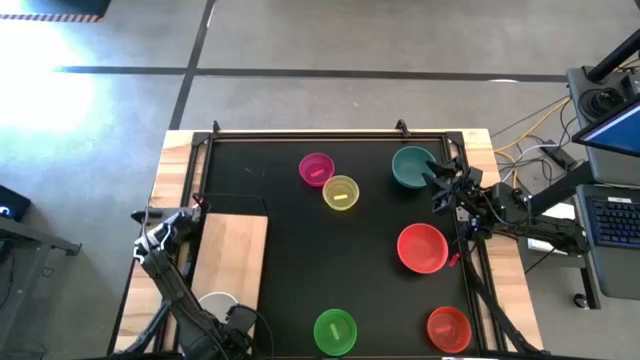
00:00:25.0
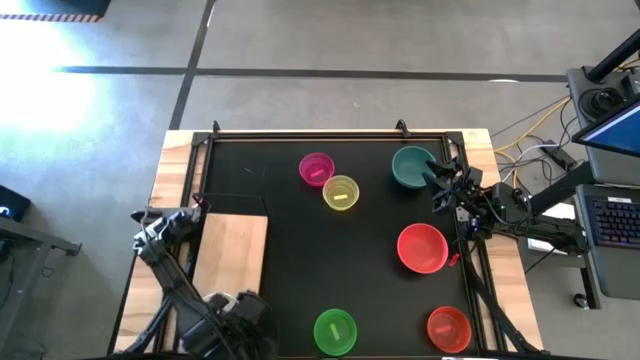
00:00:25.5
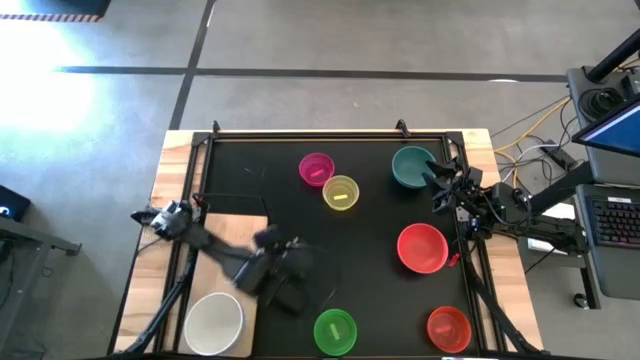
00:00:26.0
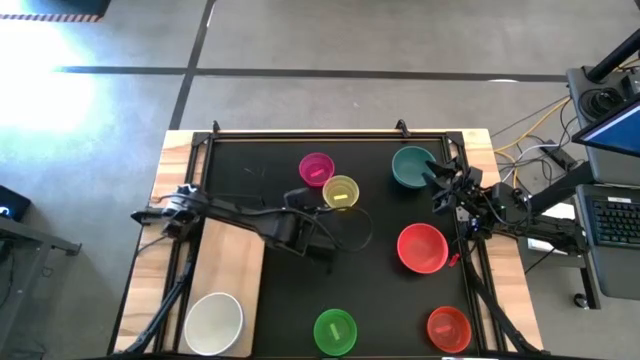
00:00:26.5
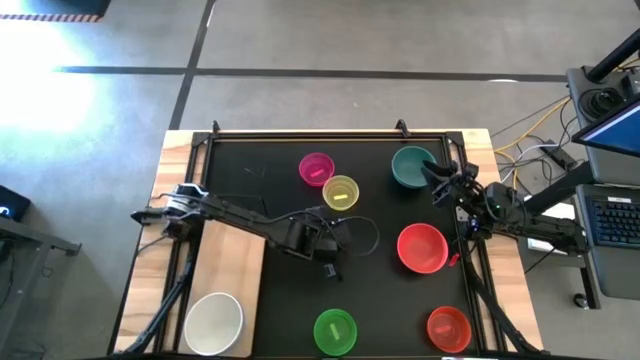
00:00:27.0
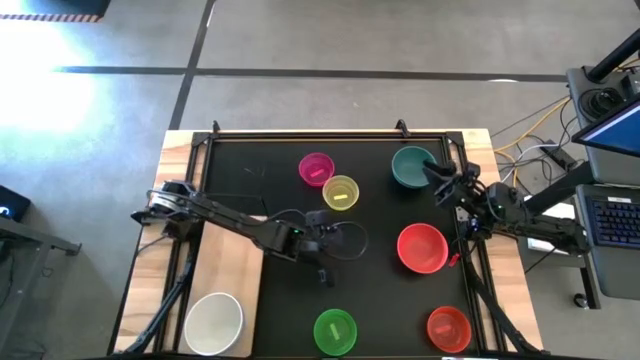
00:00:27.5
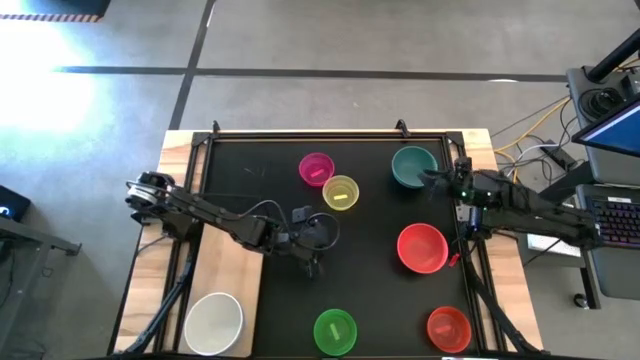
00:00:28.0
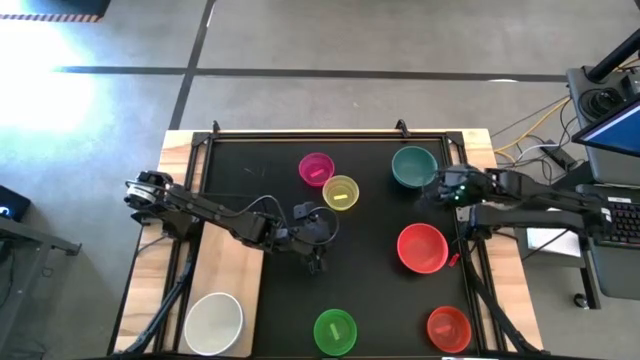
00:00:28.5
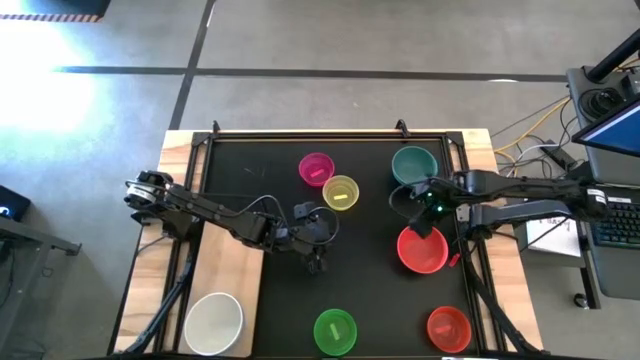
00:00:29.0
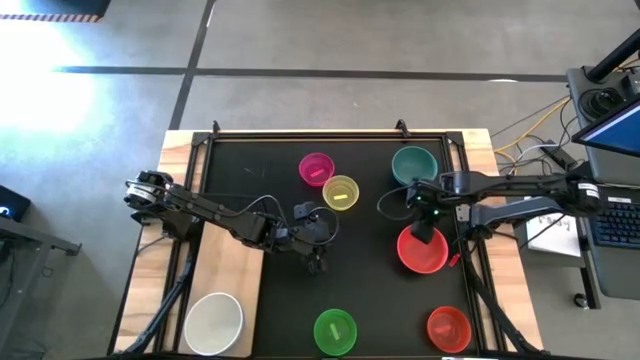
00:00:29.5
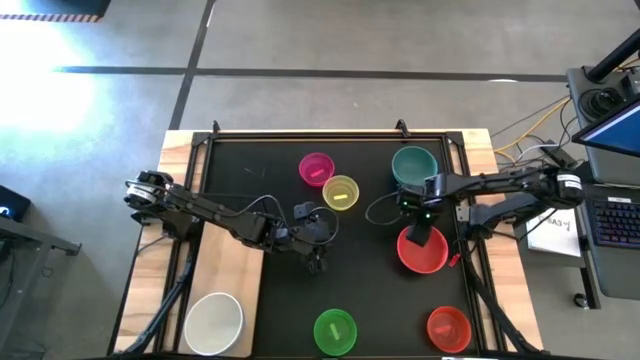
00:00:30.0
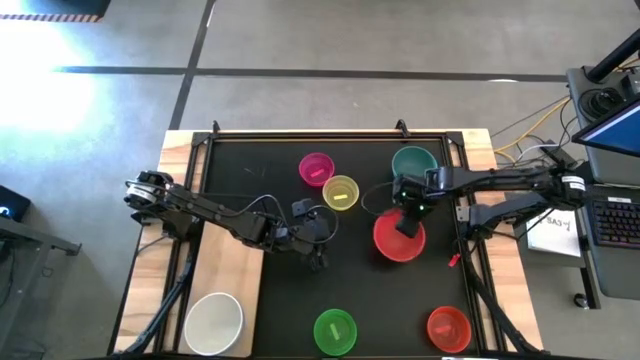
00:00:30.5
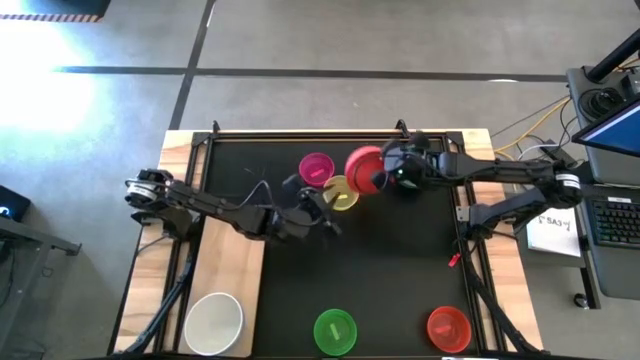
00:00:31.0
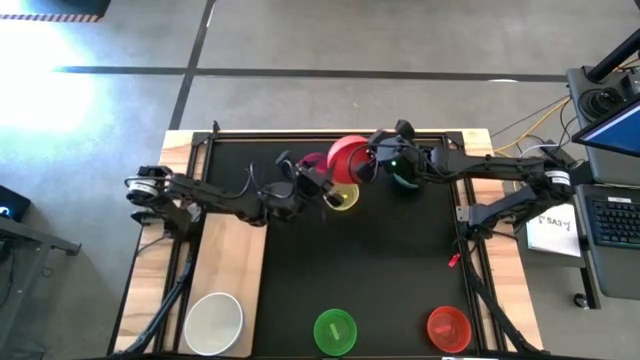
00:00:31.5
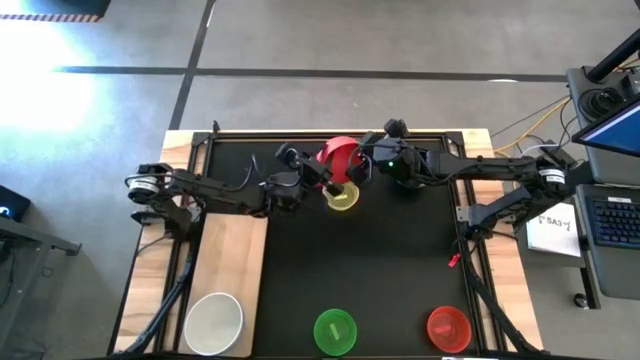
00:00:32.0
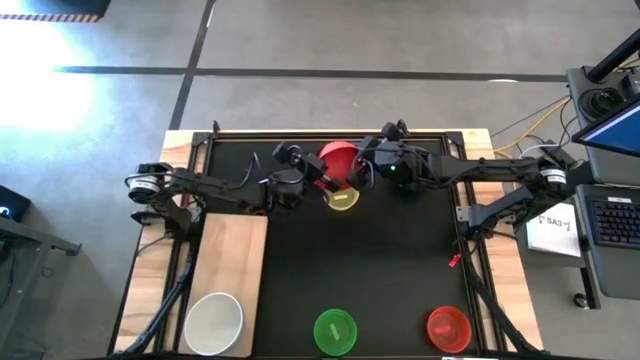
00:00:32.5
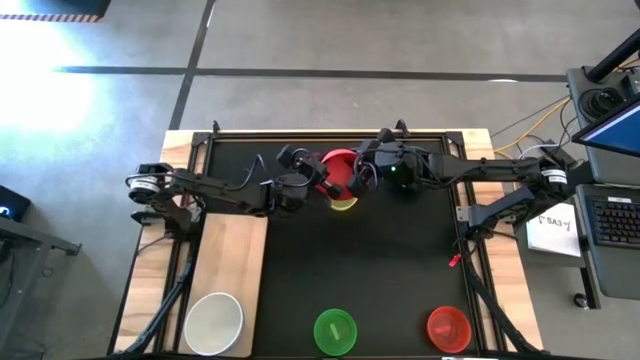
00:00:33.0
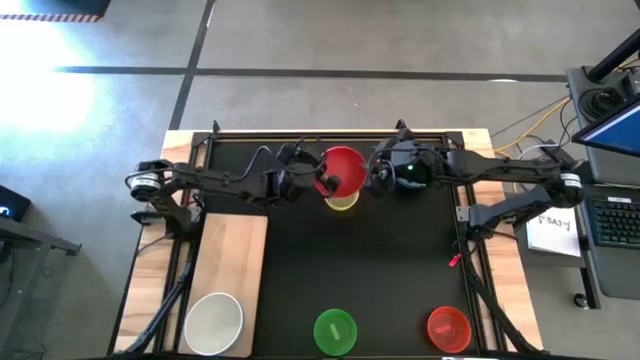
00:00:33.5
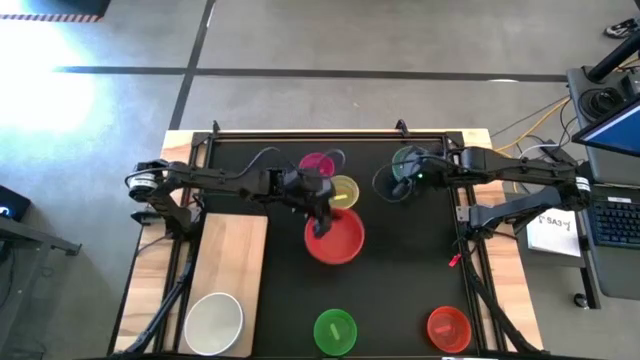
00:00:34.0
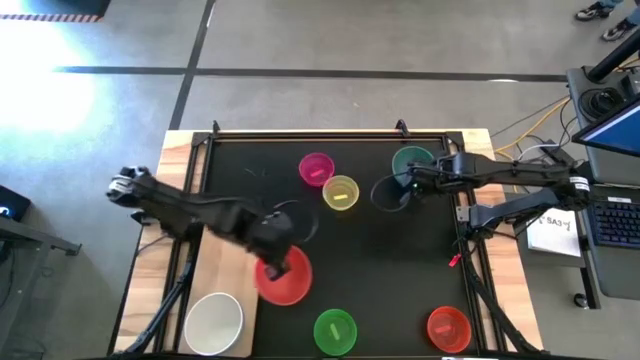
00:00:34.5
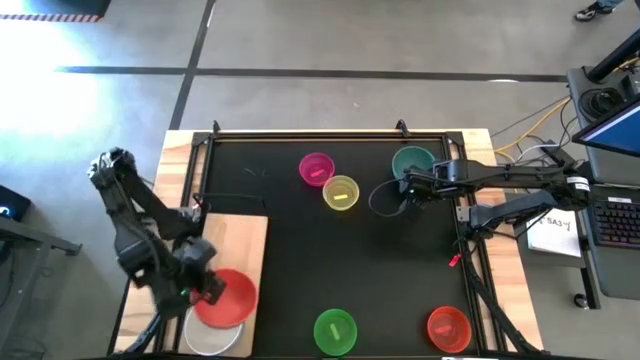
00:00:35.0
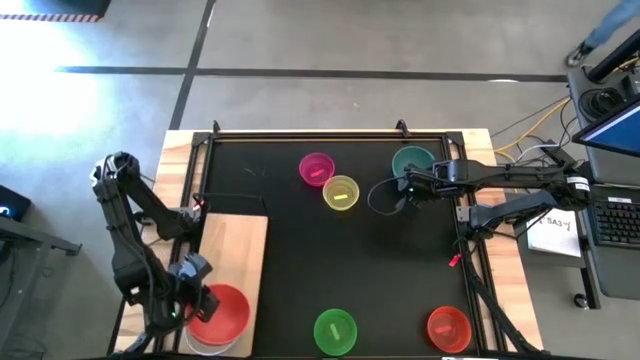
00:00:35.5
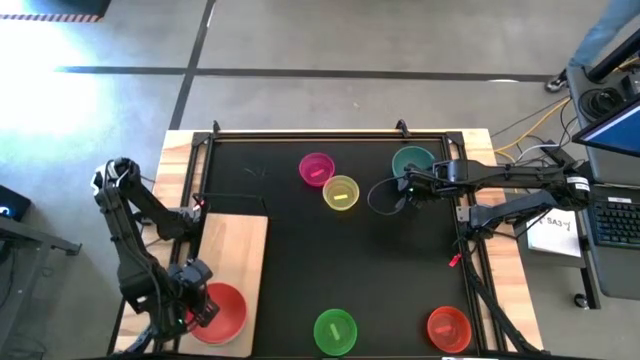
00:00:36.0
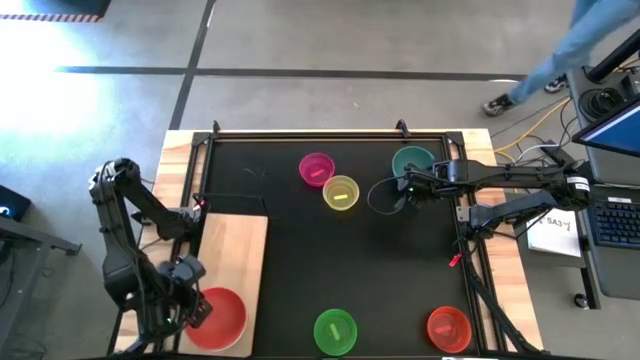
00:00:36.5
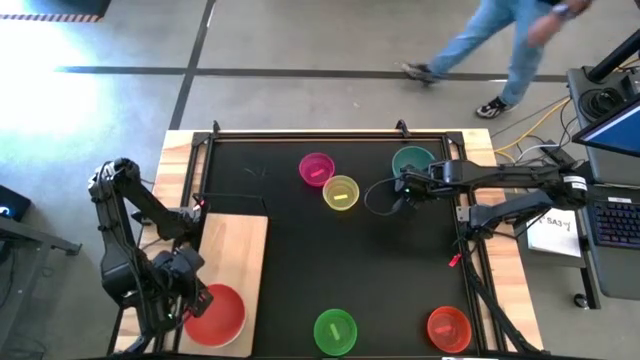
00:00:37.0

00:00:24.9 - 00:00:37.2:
Task: Place and stack bowls onto a shelf
Stack the orange bowl on top of the white bowl on the shelf

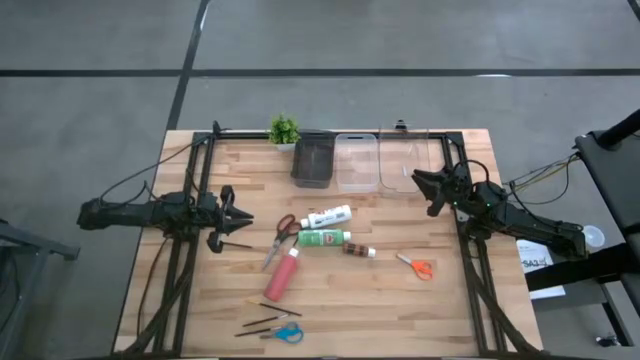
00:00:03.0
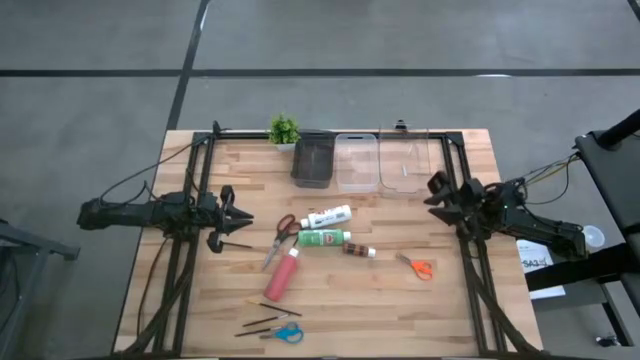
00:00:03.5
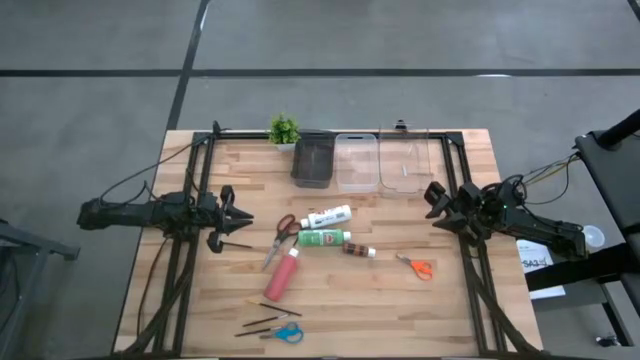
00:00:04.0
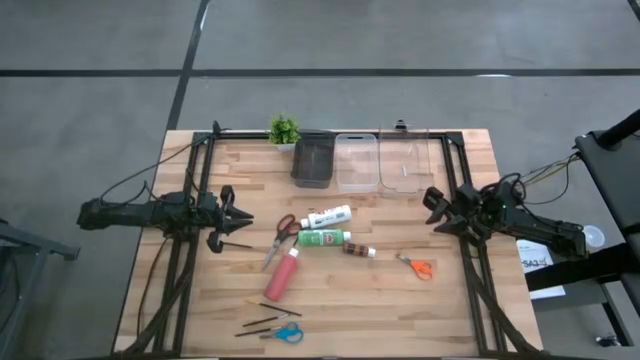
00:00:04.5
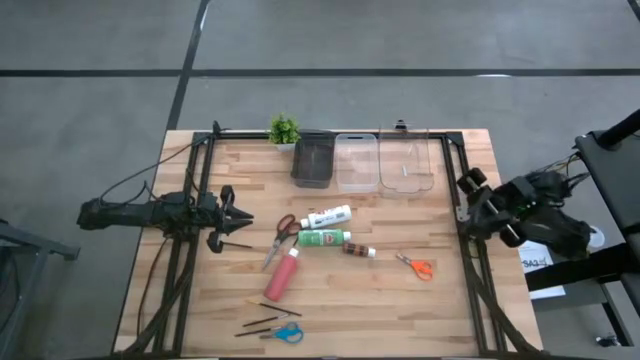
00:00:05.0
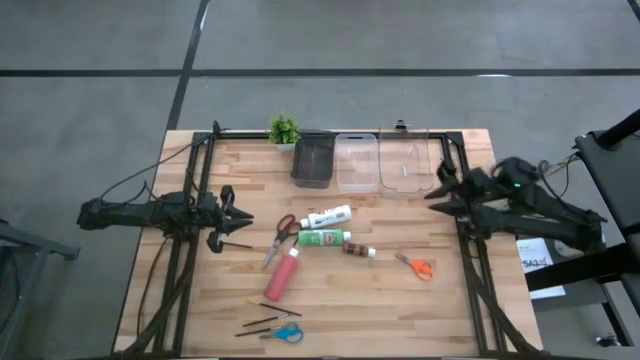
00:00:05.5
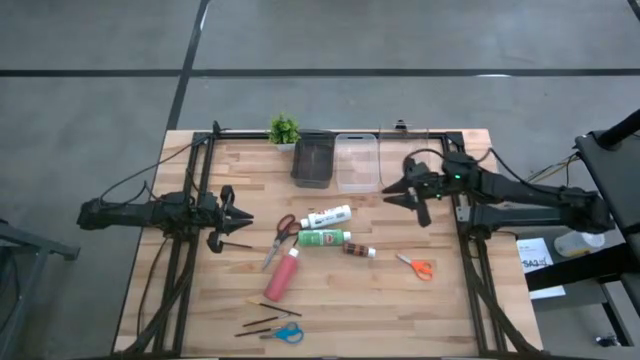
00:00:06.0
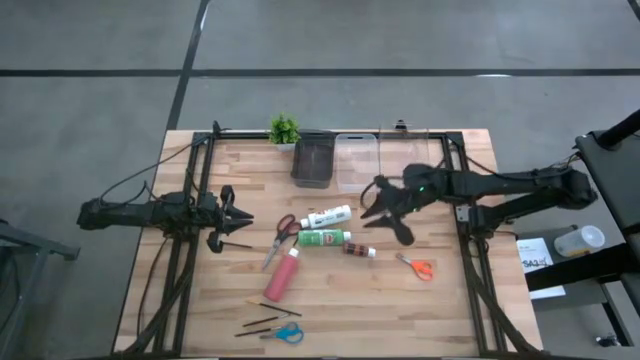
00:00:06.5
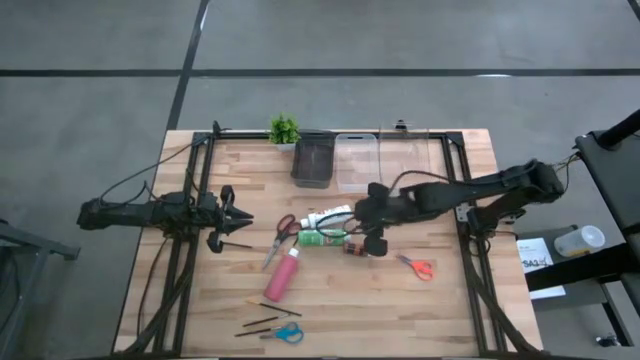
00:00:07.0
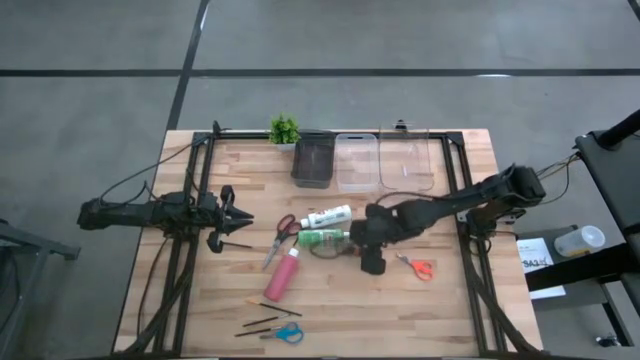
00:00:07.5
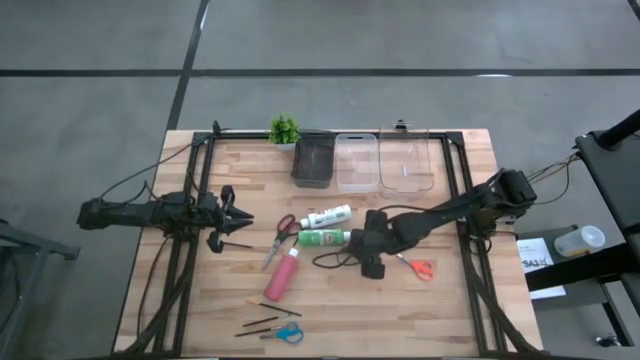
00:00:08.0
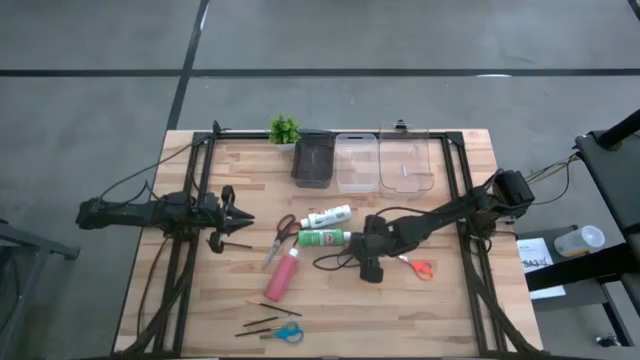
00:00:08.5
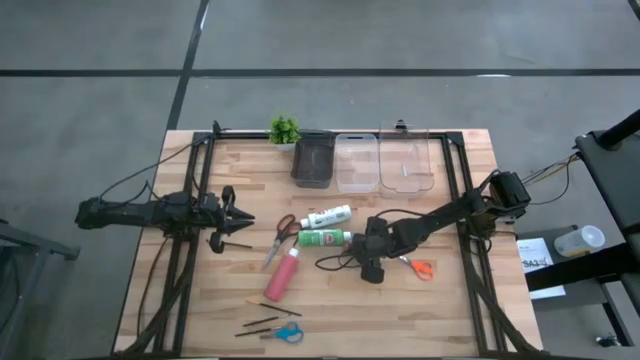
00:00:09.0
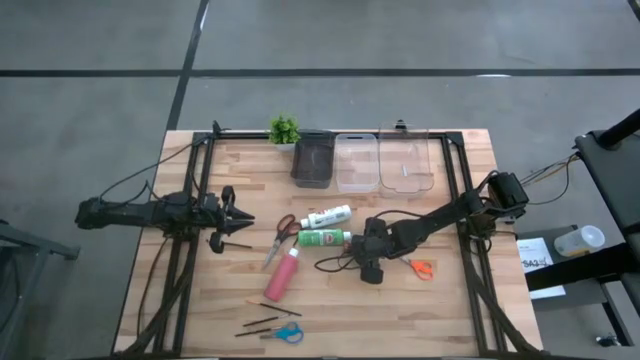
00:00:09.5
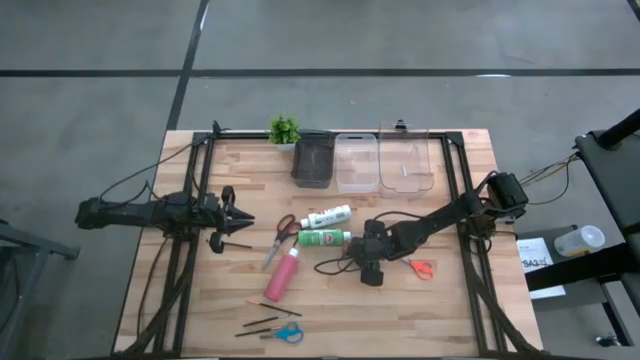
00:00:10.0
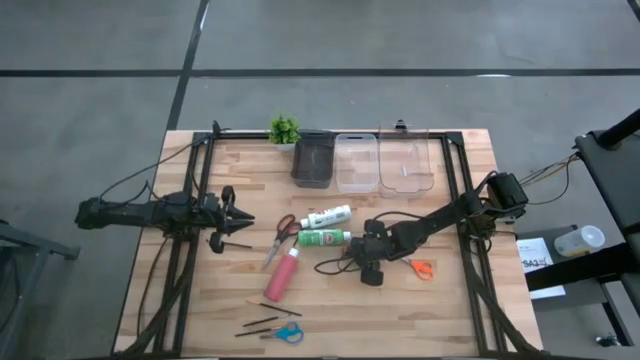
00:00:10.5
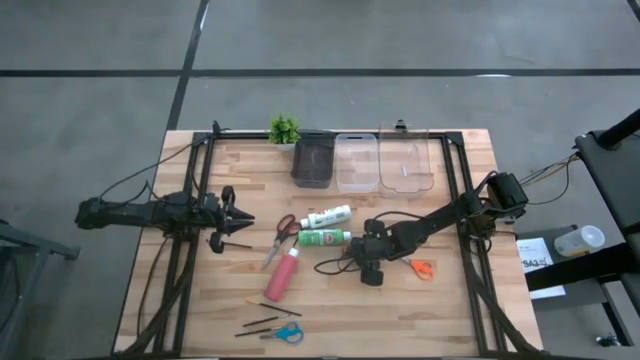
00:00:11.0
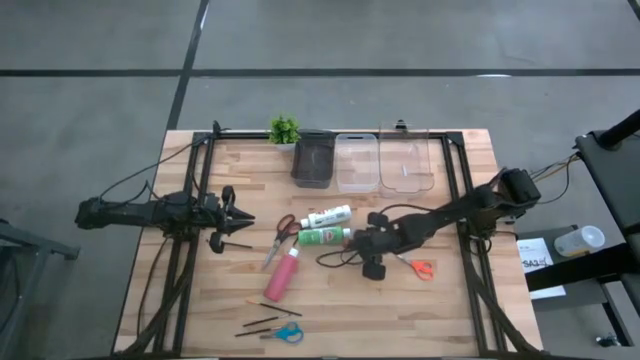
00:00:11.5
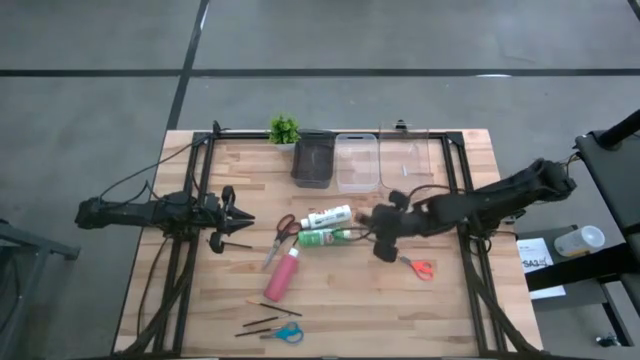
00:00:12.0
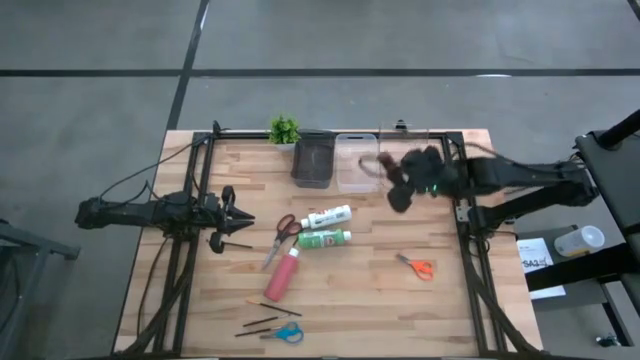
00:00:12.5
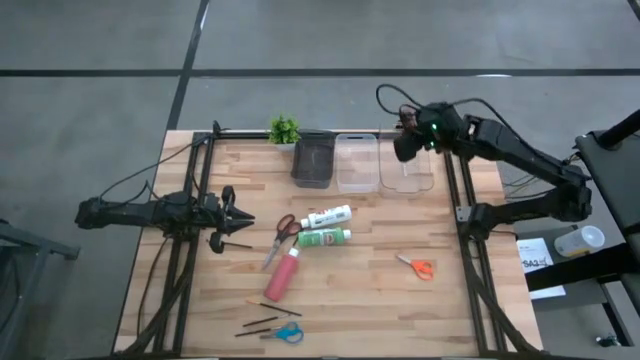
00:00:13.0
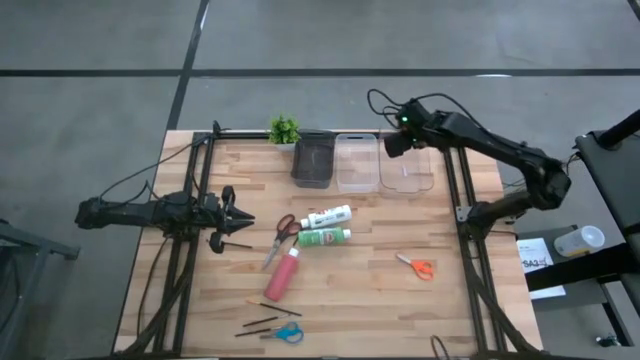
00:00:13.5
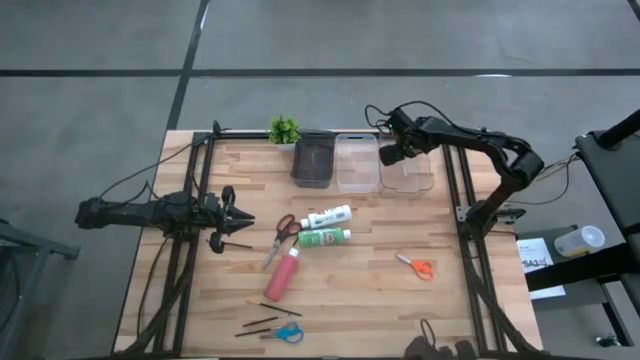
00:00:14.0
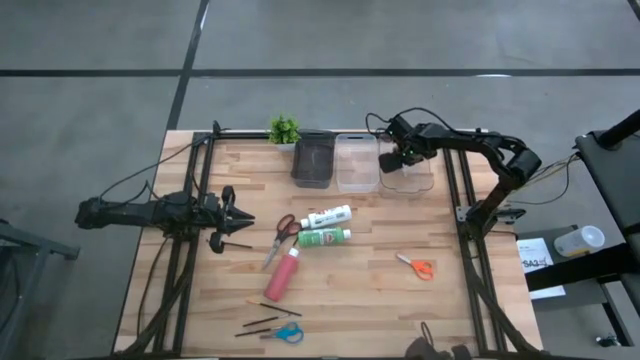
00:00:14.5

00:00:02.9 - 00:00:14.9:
Task: Pick & Place Paint Supplies
Put the orange paint bottle into the transparent bin
